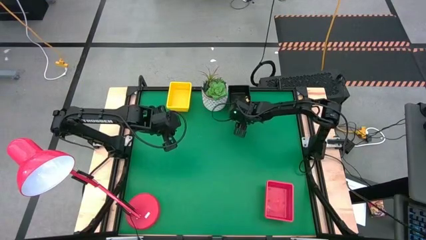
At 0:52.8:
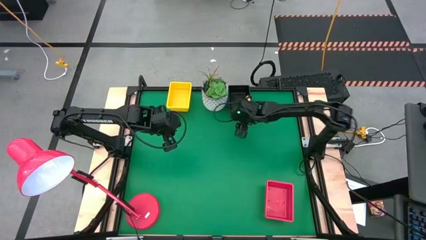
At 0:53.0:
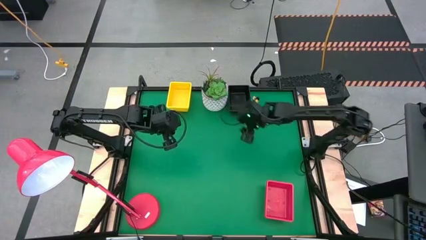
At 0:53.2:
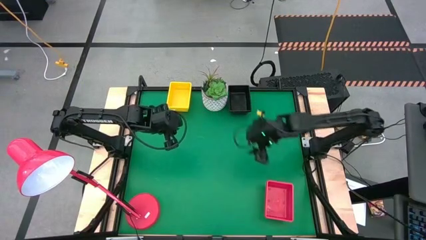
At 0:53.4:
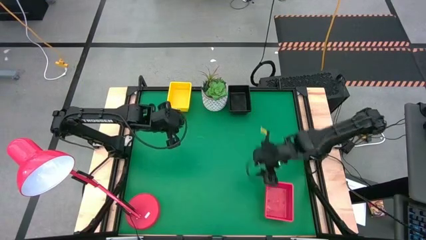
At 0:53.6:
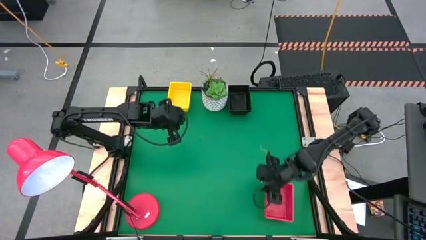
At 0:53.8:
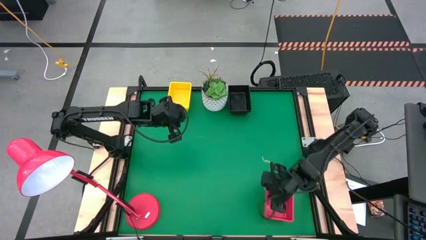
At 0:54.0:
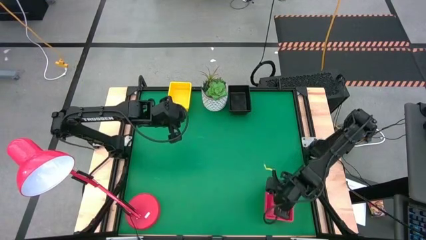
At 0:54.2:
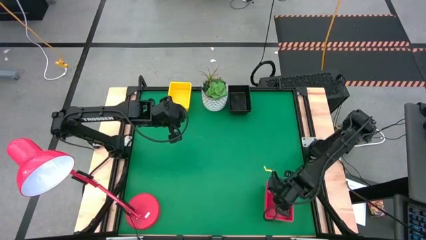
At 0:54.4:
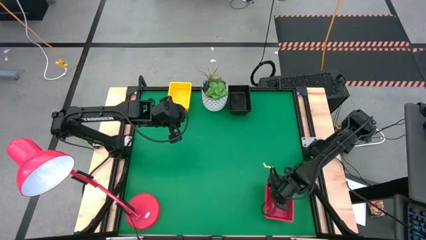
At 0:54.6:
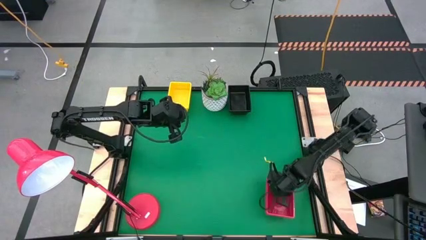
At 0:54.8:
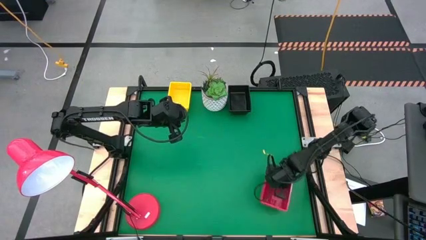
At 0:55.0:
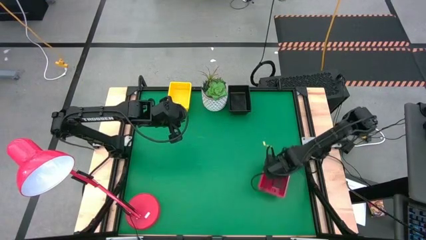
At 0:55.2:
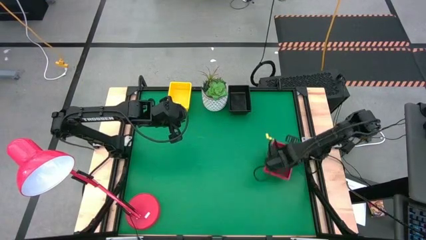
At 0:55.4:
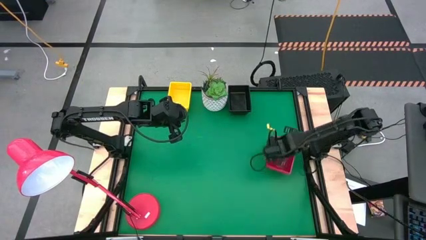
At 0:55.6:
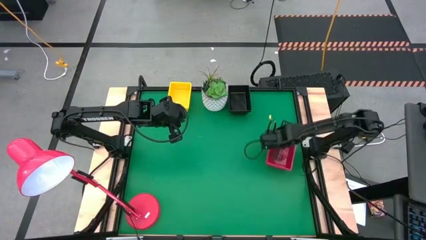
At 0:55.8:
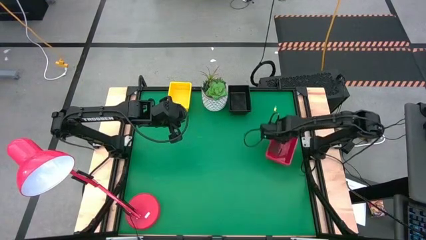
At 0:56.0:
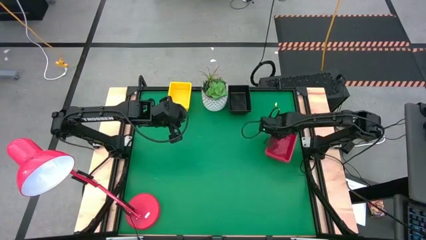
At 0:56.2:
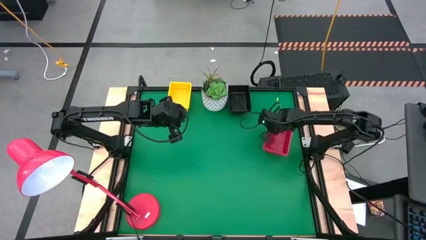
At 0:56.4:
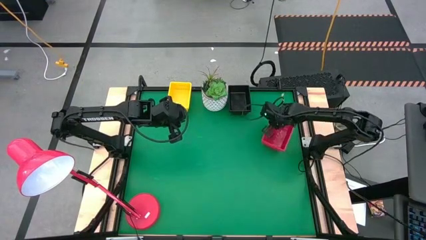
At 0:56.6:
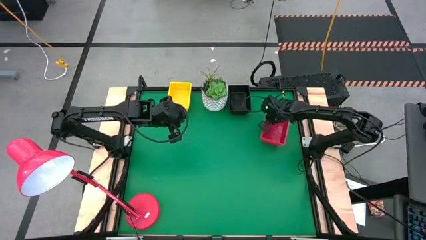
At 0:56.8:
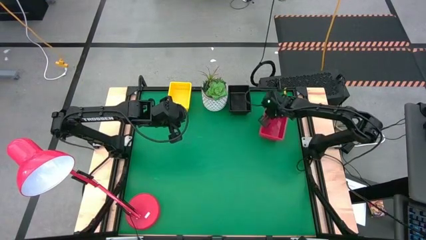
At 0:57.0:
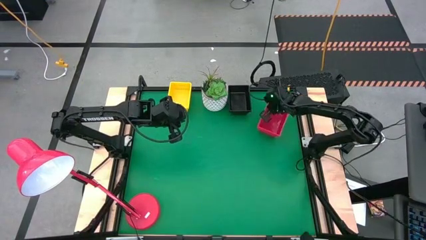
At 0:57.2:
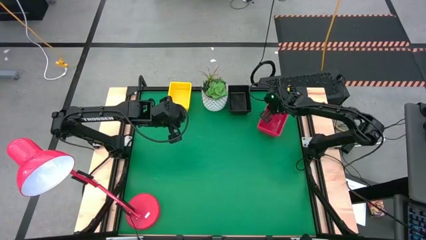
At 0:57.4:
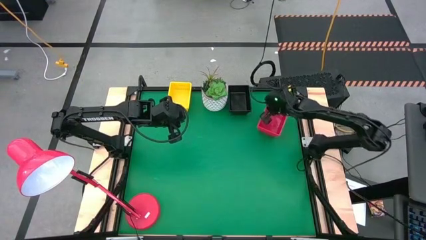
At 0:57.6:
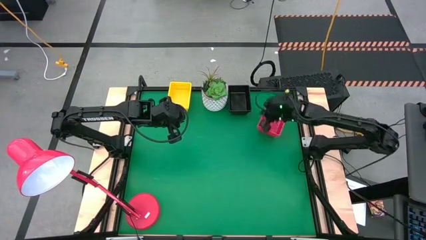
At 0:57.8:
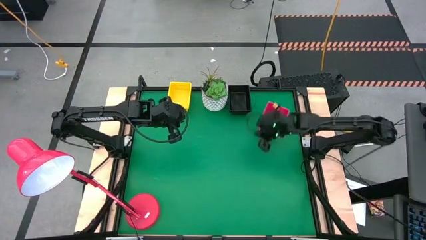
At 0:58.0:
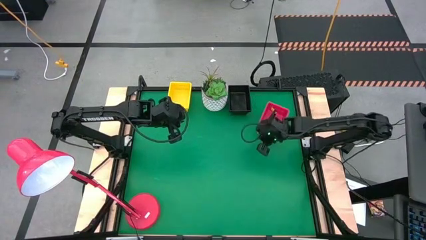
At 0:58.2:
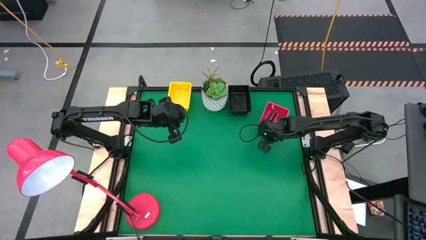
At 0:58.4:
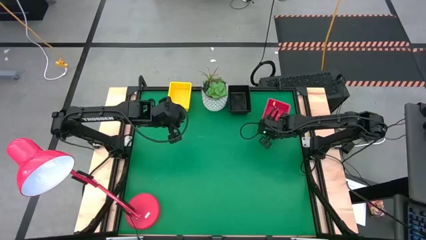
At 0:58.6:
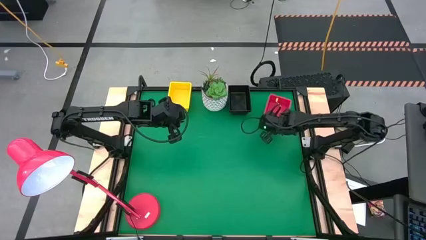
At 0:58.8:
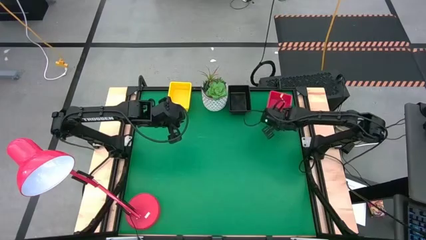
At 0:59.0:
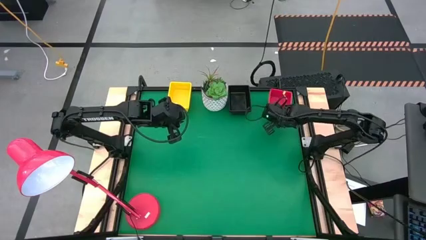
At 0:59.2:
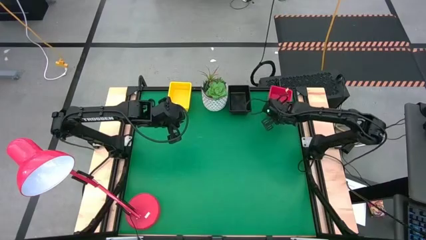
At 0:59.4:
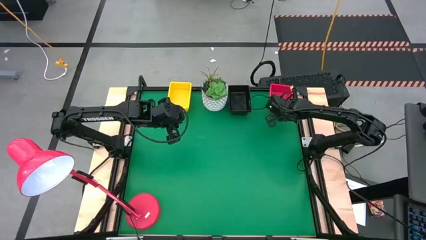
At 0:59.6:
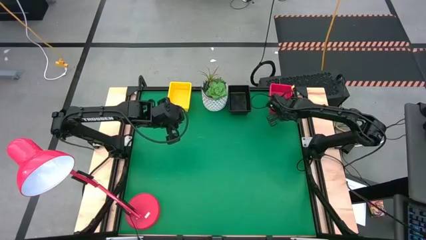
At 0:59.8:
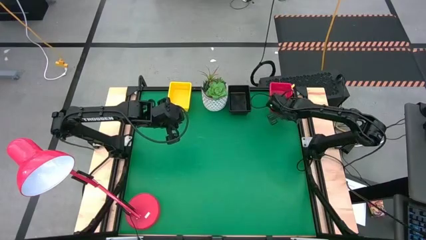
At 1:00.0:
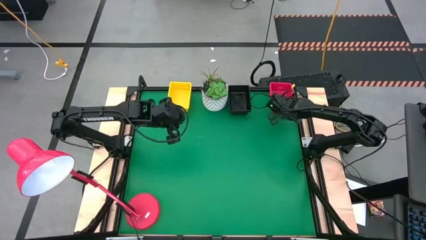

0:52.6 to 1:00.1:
Move the orange bins to the top right of the table

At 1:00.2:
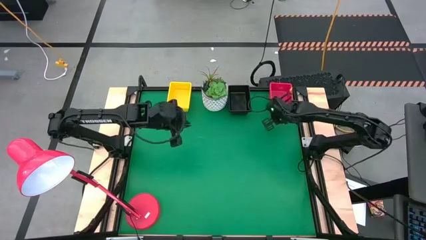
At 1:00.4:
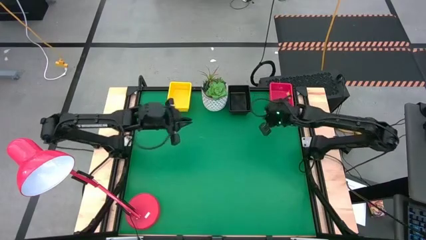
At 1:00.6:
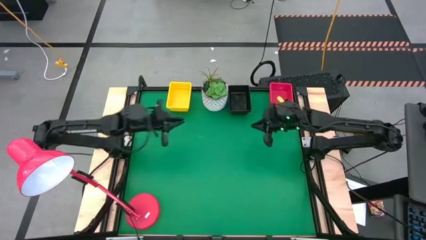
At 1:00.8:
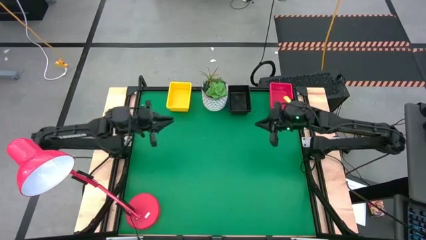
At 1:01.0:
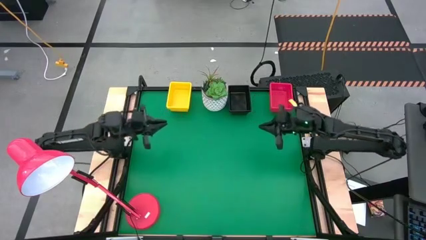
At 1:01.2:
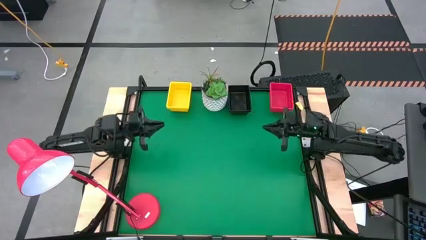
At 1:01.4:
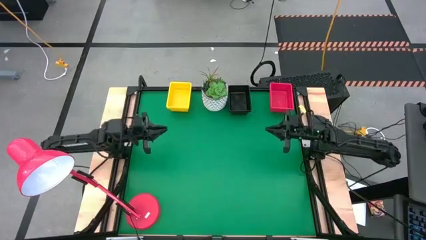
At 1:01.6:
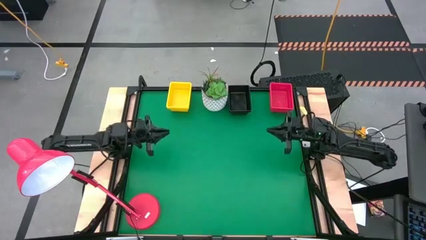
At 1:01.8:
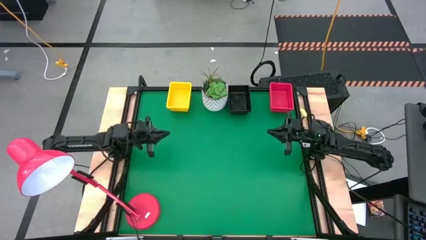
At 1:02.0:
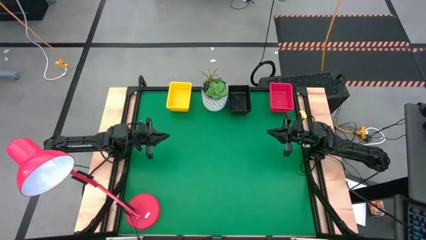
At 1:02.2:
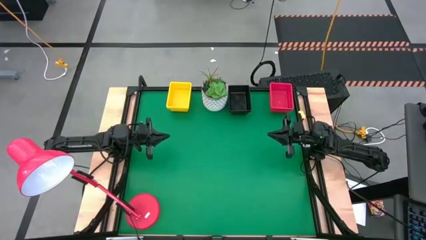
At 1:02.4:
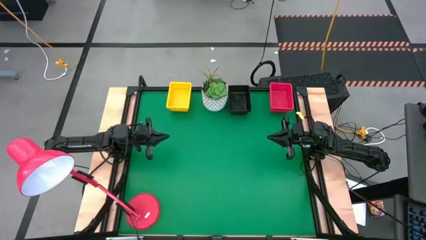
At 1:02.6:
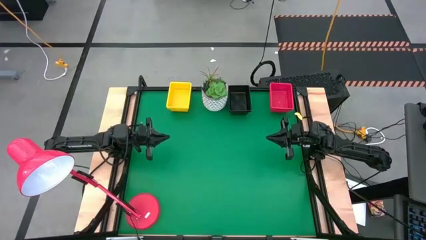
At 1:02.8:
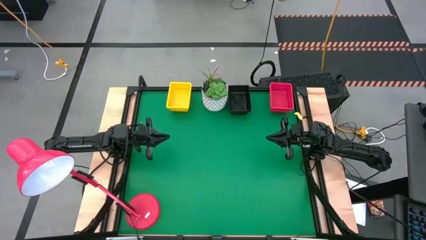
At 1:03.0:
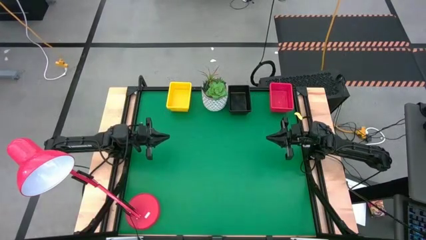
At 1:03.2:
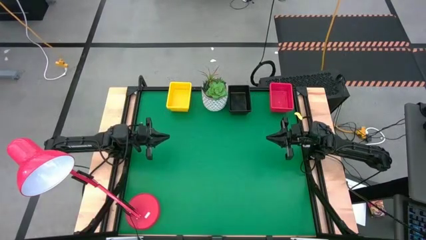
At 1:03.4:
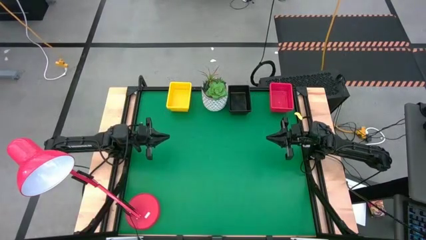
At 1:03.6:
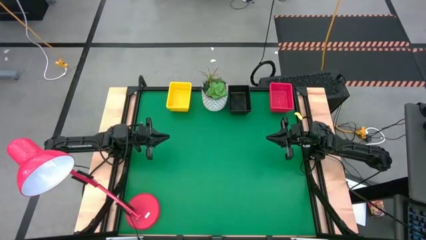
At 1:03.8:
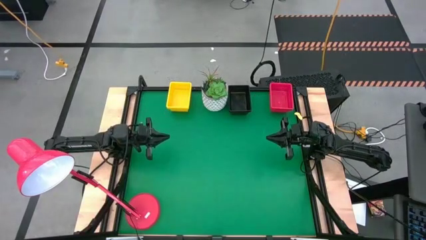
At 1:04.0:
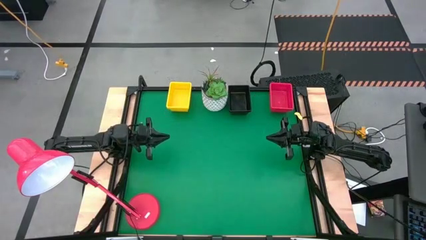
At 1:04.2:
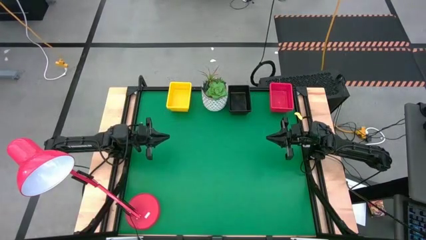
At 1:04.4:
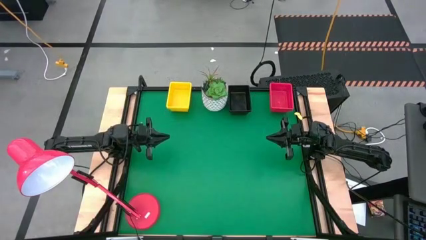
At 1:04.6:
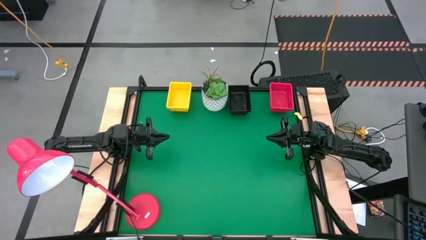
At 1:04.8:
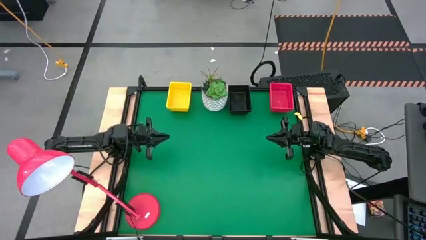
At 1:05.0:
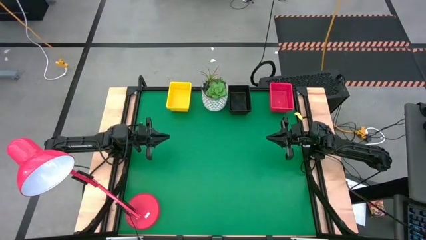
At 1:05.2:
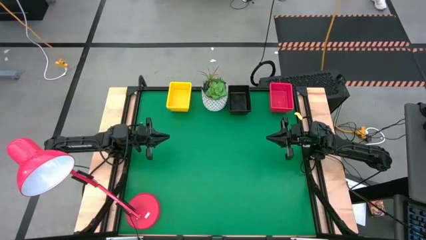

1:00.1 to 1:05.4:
Return to Home Position
